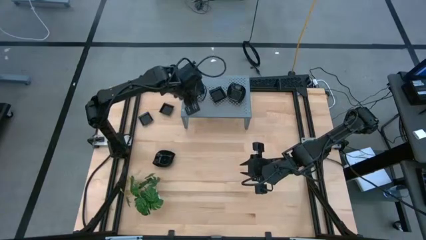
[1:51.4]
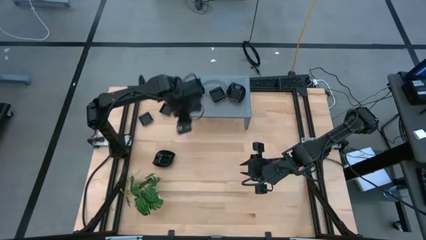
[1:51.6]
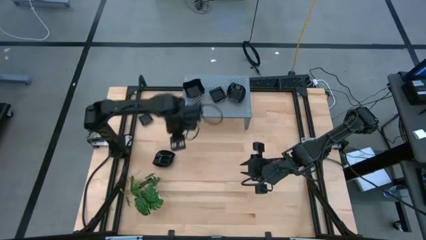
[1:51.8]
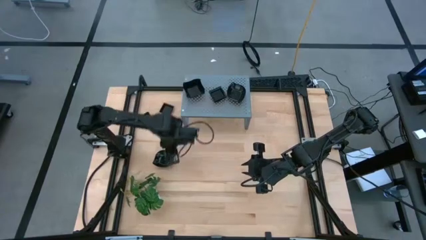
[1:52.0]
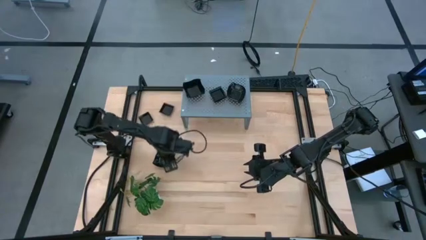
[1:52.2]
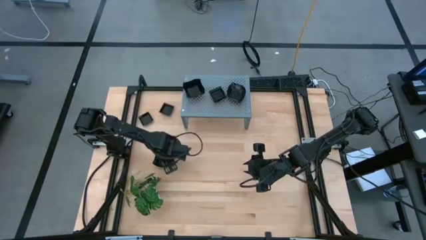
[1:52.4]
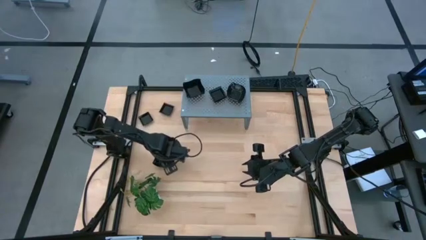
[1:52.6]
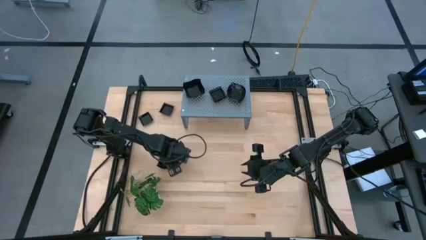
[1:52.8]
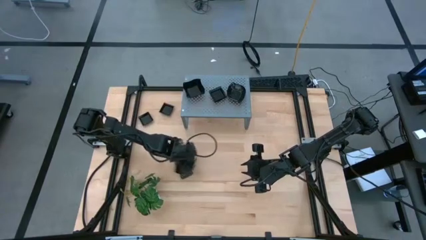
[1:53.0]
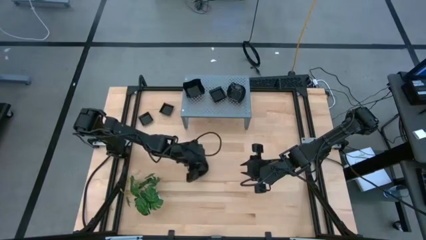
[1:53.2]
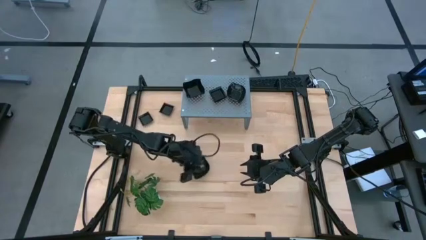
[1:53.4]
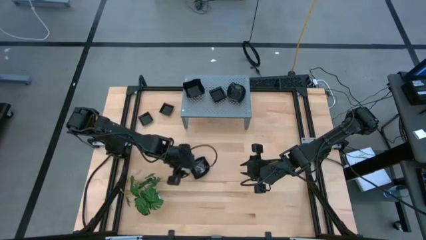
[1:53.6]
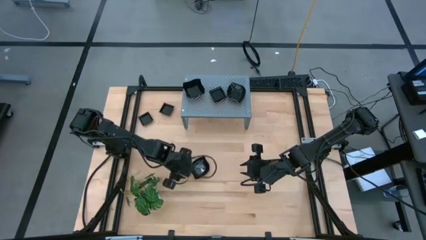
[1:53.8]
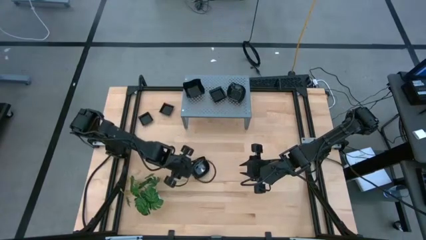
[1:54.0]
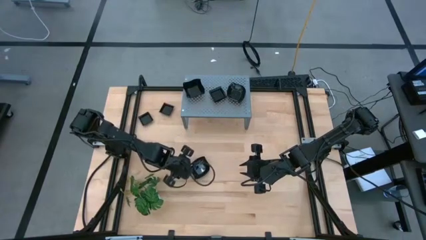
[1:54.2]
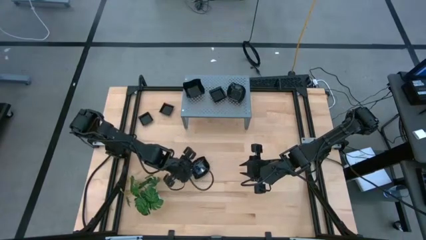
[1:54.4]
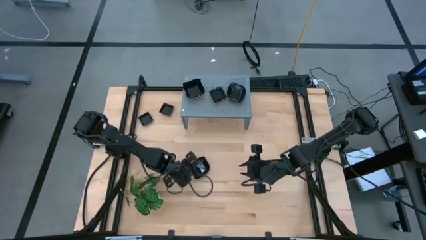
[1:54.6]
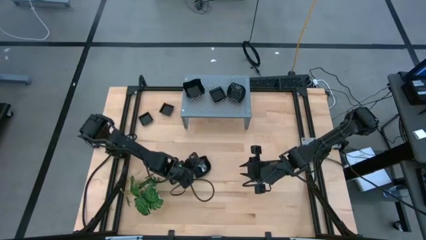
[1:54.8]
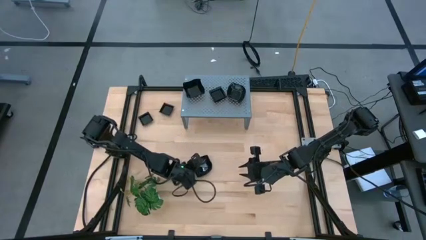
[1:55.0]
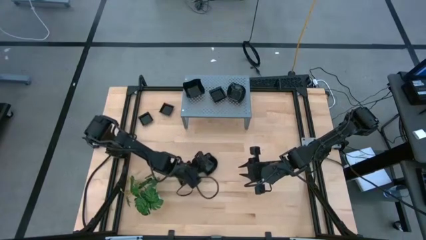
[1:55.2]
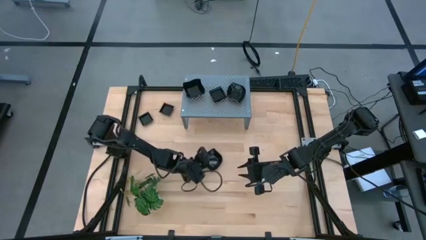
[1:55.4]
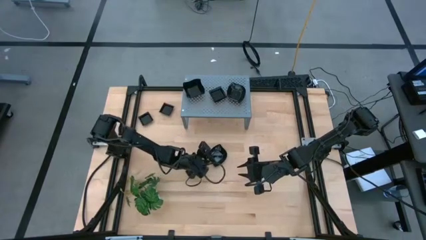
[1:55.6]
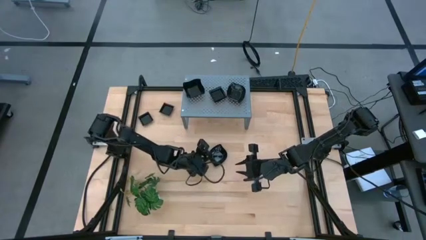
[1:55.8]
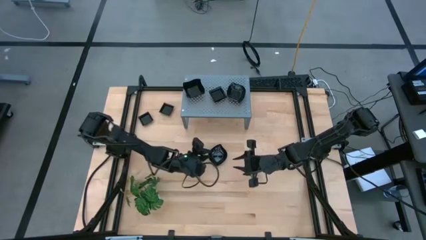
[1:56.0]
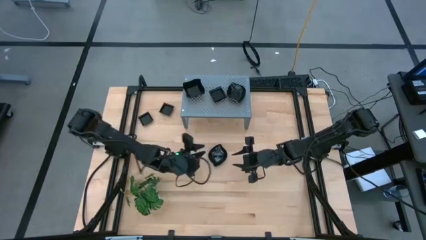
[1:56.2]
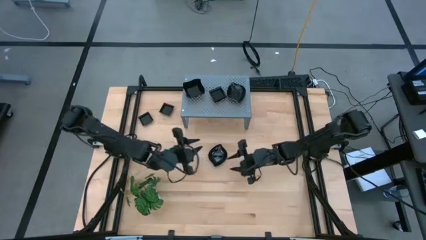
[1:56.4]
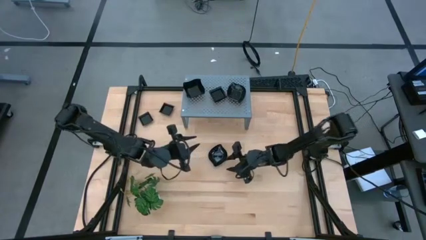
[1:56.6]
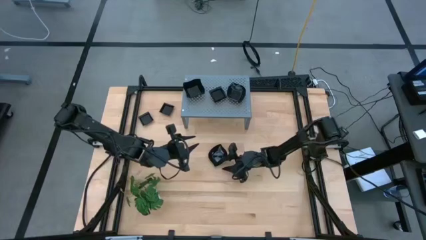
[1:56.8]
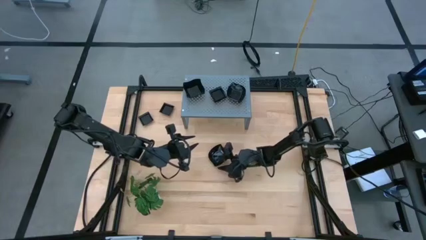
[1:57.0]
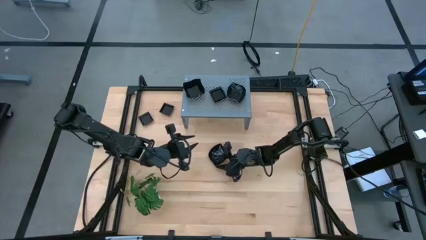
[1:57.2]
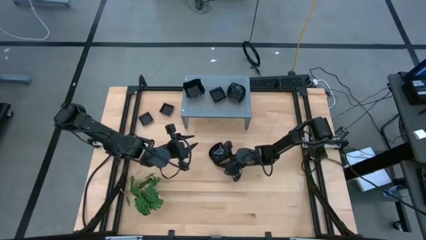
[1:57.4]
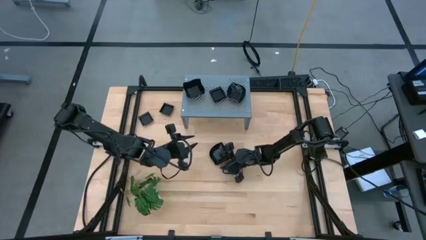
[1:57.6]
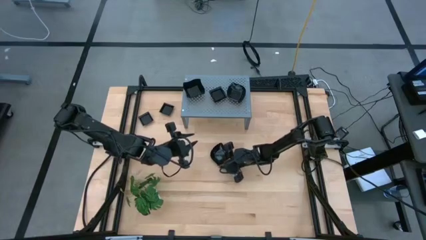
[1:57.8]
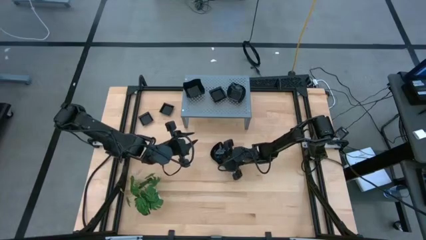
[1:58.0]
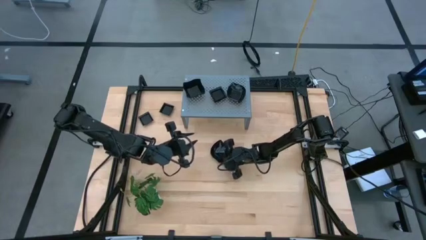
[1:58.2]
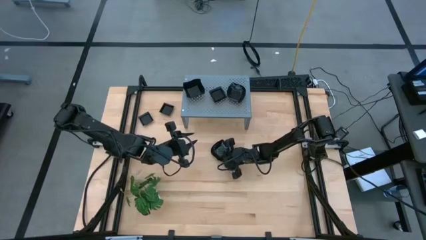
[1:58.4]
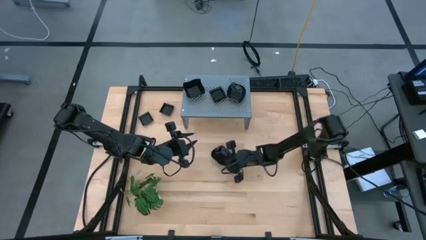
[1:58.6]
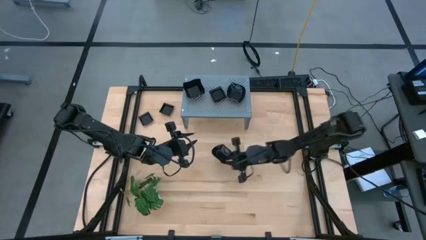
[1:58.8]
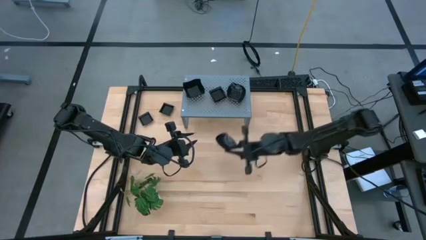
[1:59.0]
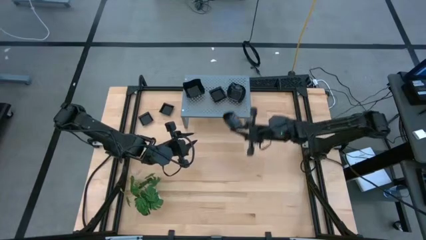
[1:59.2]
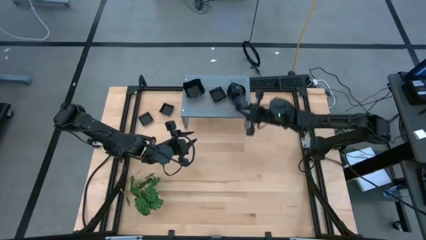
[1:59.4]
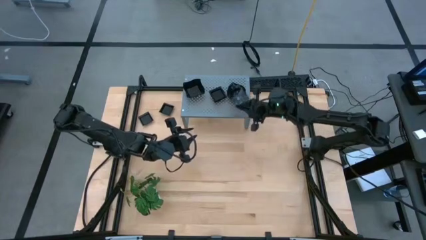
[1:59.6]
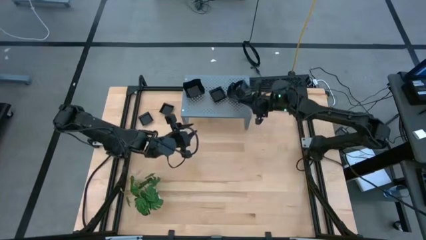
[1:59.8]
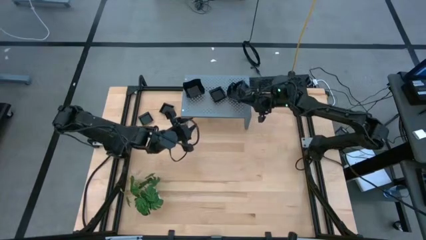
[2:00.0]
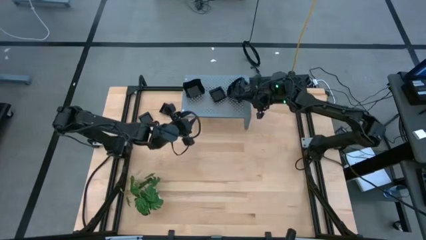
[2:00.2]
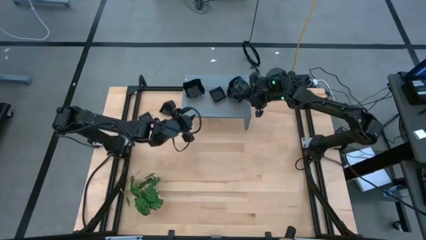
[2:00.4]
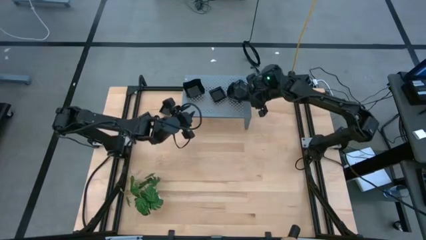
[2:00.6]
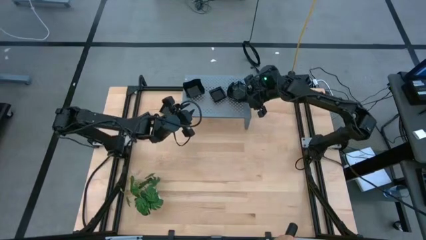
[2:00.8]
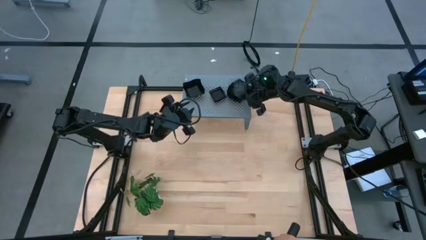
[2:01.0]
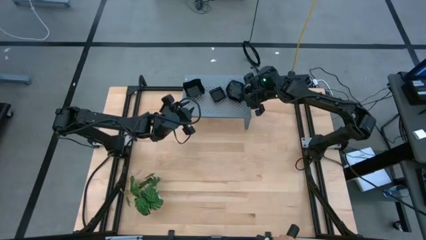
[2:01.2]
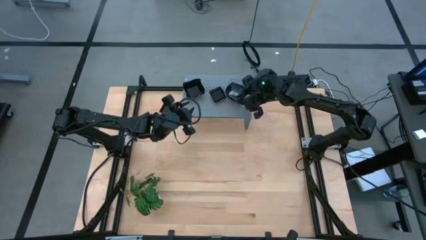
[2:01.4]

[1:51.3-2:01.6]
Task: Pick & Place Mini shaped plates
Stack the black leaf shaped plate on top of the black leaf shaped plates on the shelf

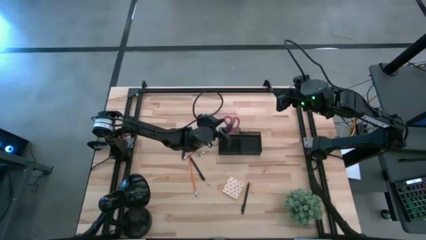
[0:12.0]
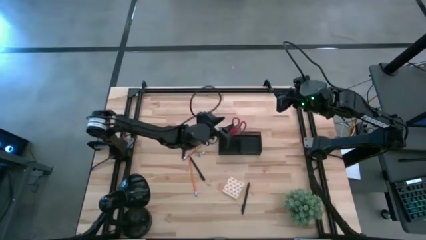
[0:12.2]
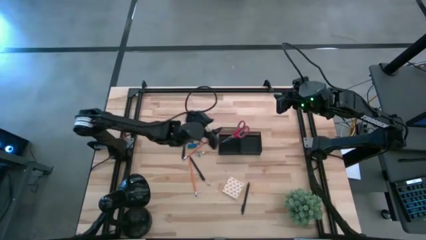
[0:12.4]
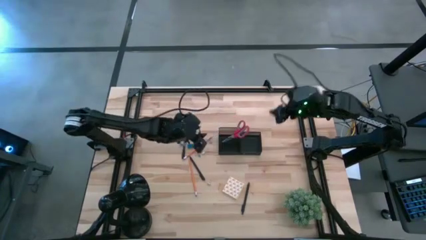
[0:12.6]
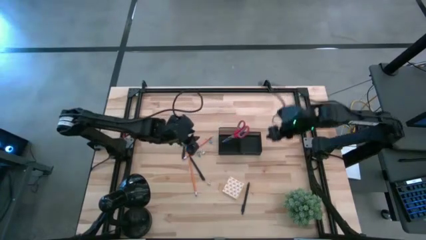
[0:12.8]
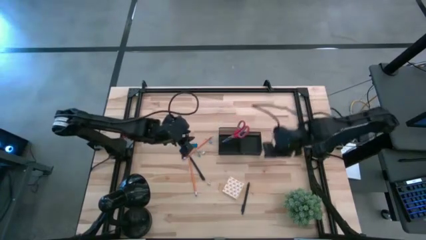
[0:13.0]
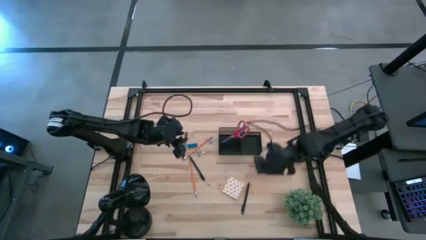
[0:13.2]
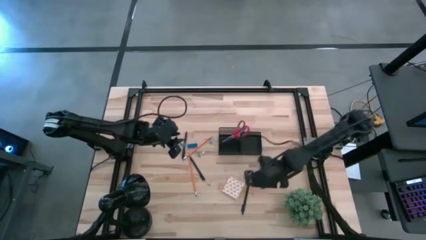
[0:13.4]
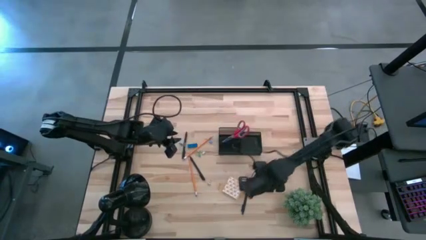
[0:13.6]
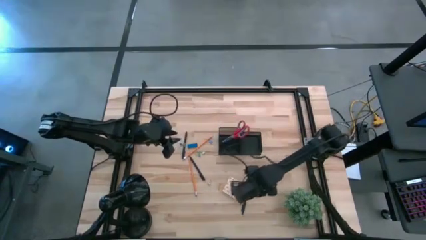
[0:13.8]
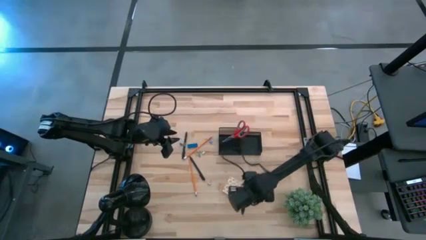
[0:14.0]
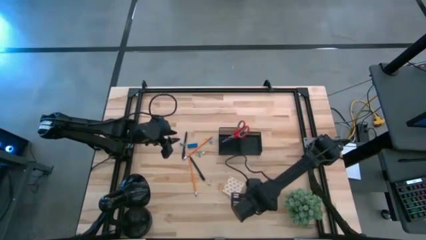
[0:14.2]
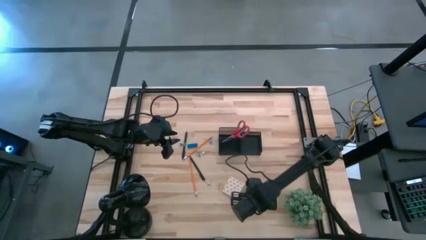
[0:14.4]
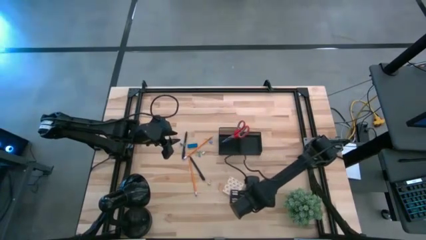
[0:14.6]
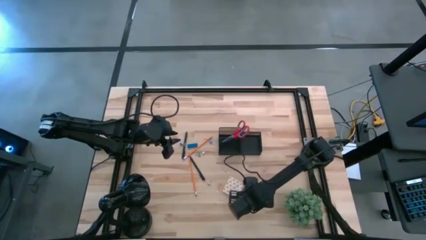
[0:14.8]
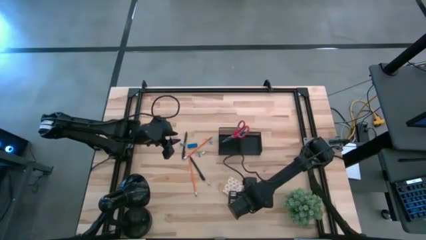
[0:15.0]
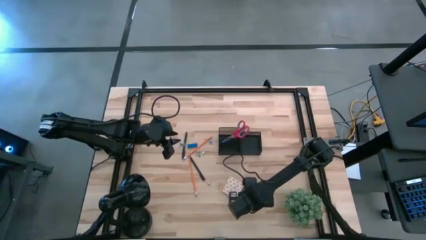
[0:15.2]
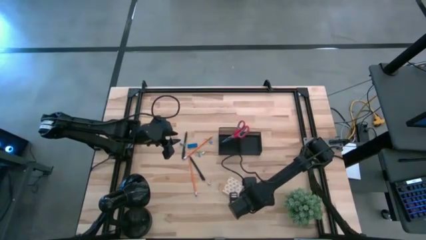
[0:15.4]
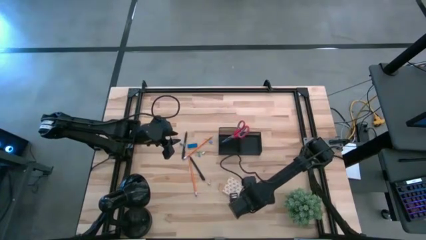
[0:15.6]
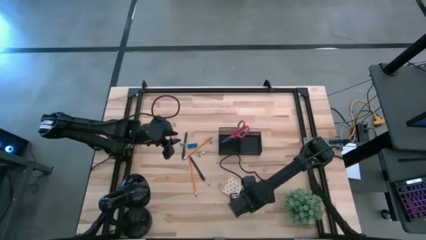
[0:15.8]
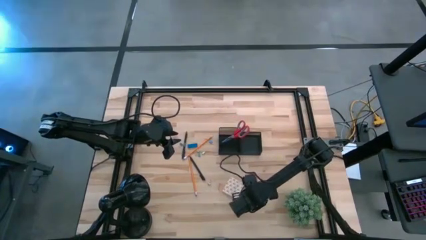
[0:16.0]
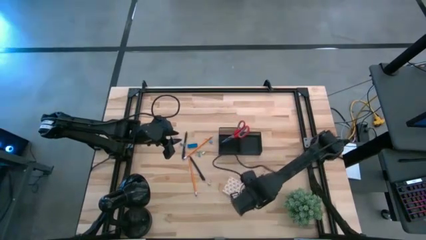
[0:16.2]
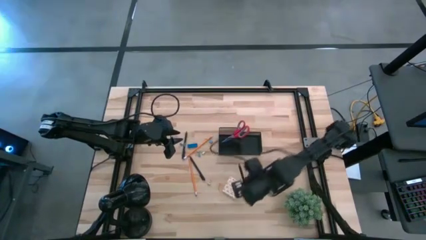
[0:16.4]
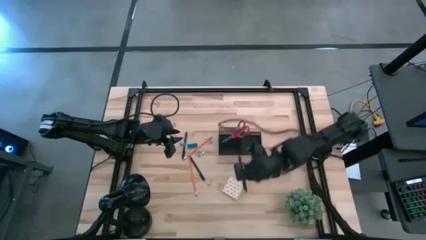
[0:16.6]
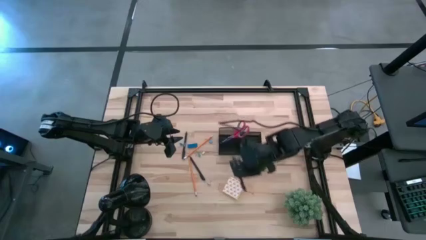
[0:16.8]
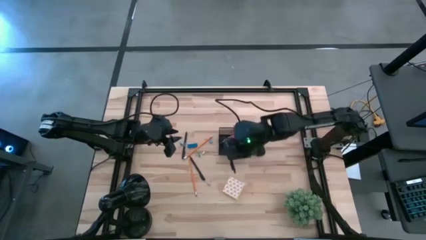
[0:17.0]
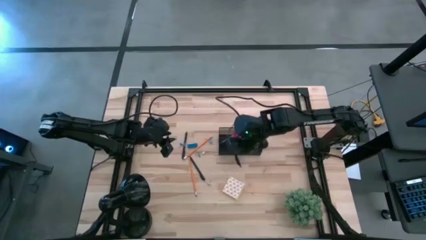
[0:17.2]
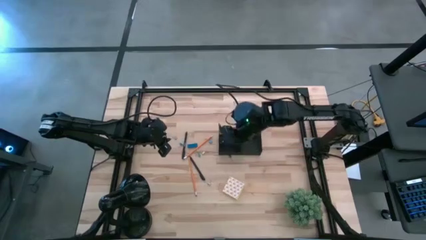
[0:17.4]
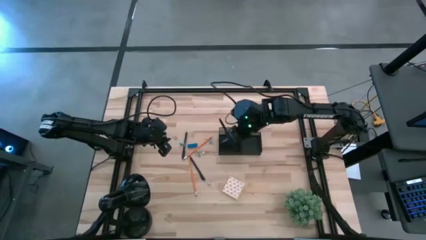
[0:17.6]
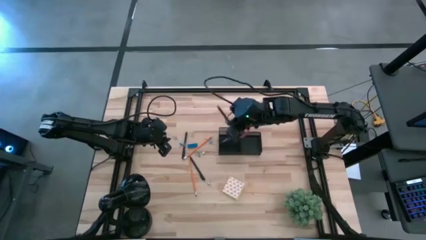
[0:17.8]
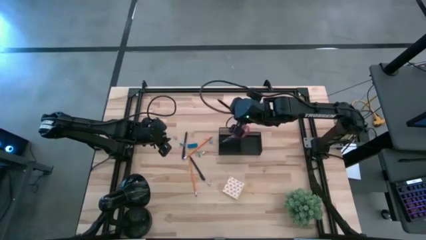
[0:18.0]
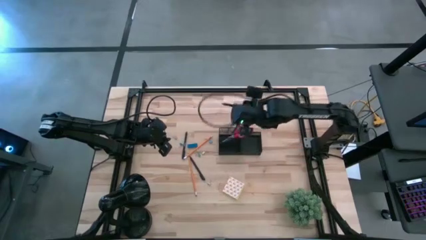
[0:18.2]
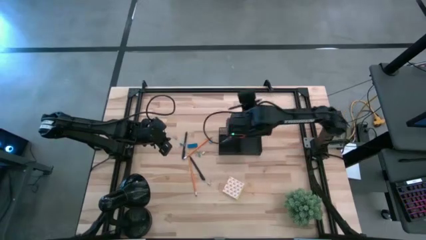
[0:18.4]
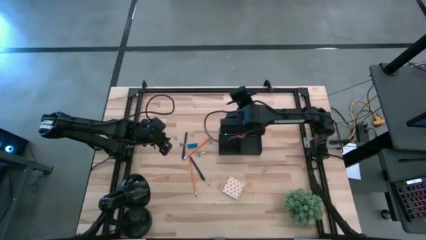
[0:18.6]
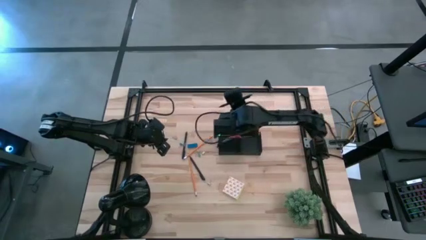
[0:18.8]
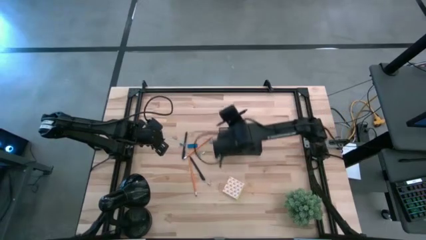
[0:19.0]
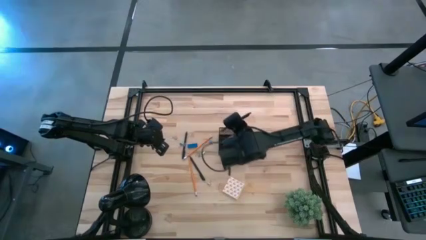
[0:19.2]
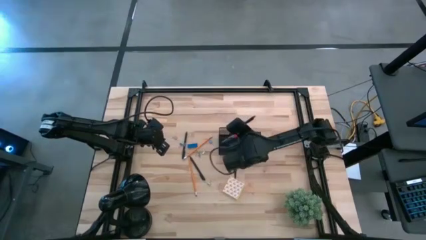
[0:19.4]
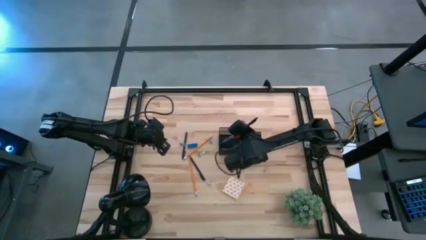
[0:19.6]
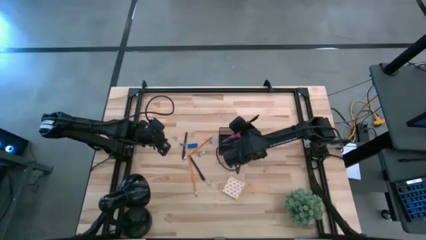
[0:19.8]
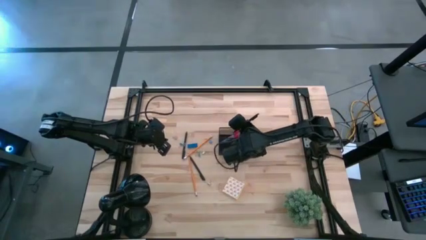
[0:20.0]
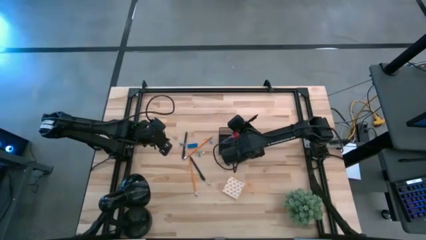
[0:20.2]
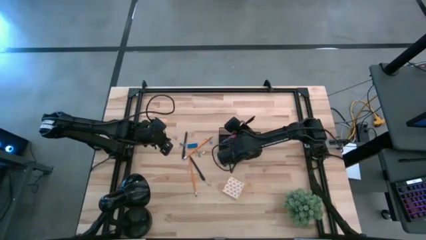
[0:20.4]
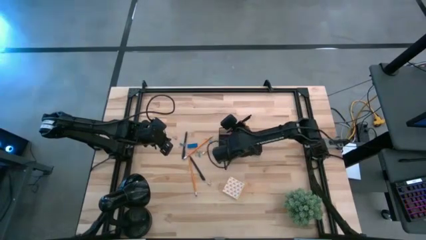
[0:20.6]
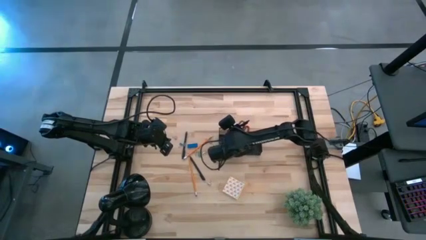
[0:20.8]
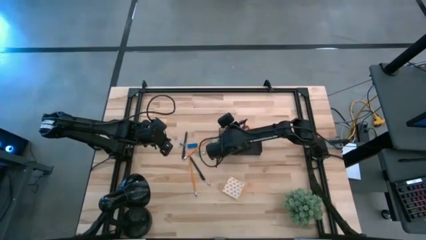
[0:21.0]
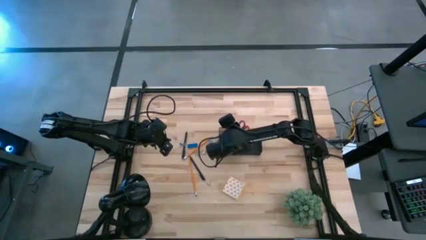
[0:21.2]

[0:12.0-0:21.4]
Task: Pick and place office supplies into organizer
Put the bottom right pen into the desk organizer
